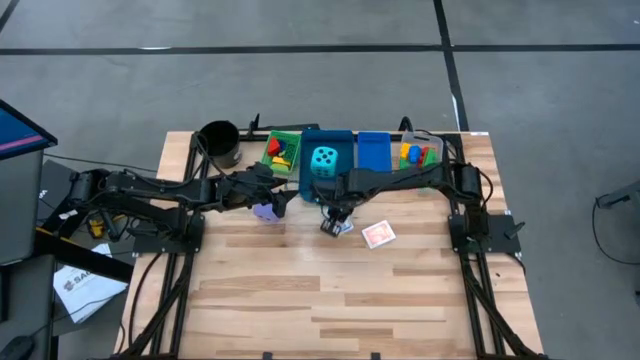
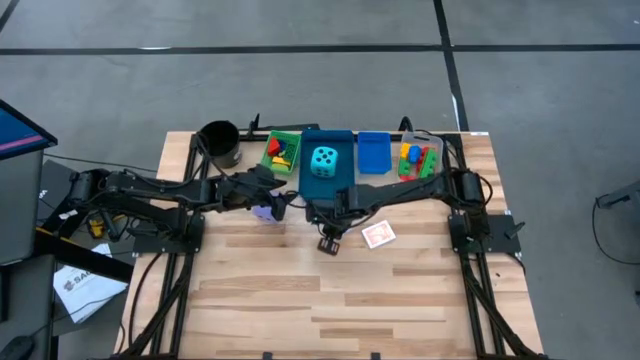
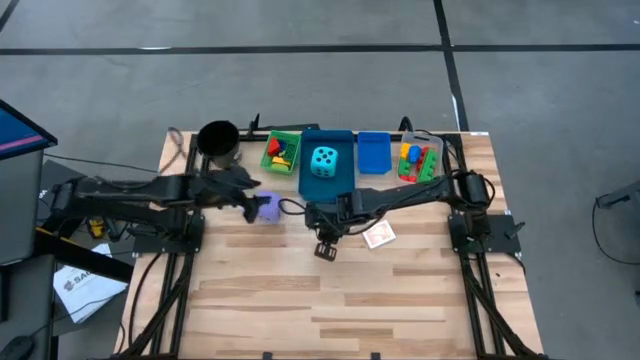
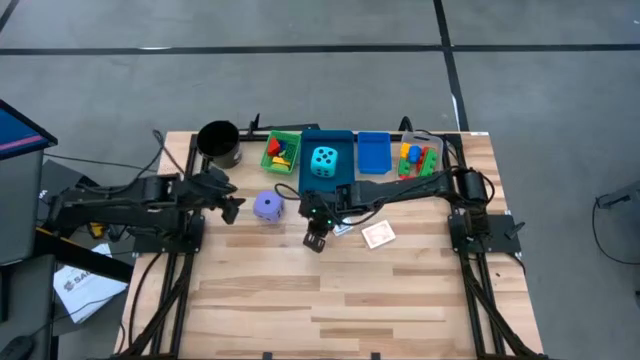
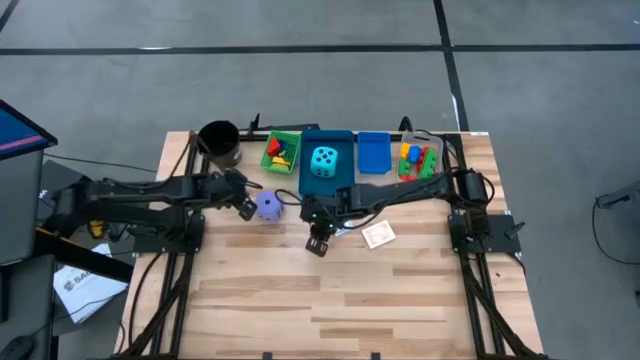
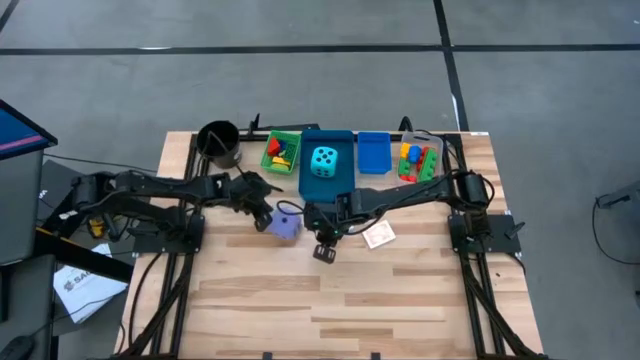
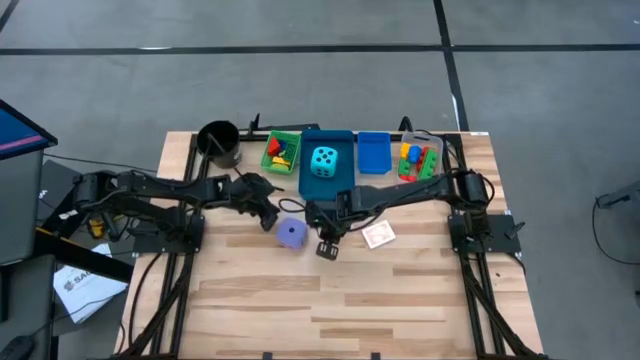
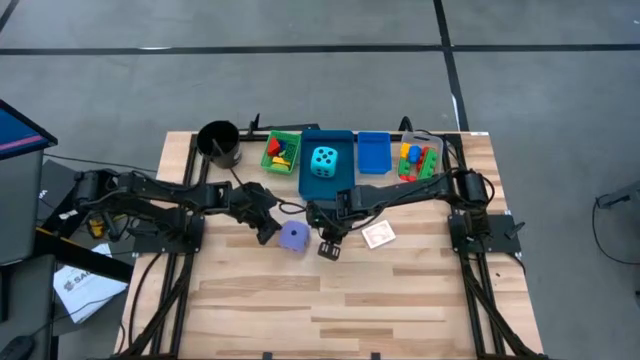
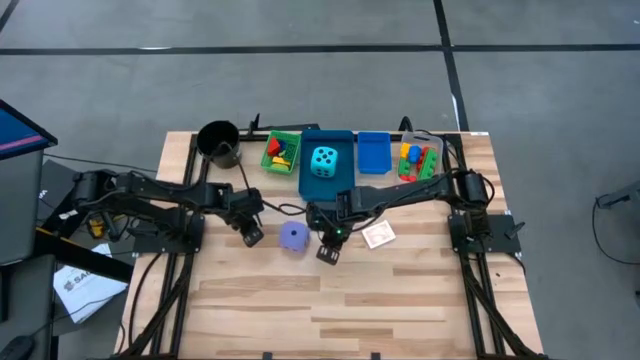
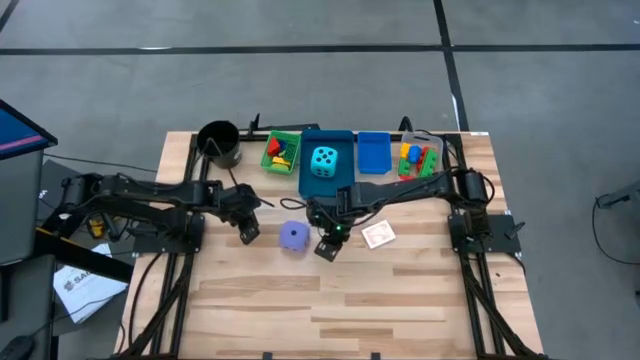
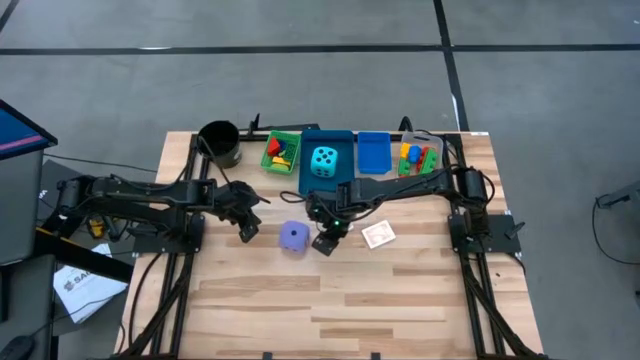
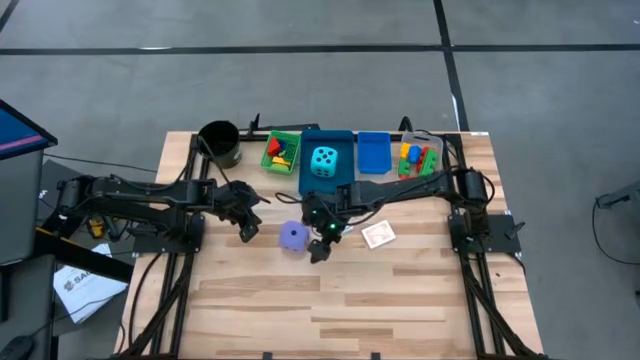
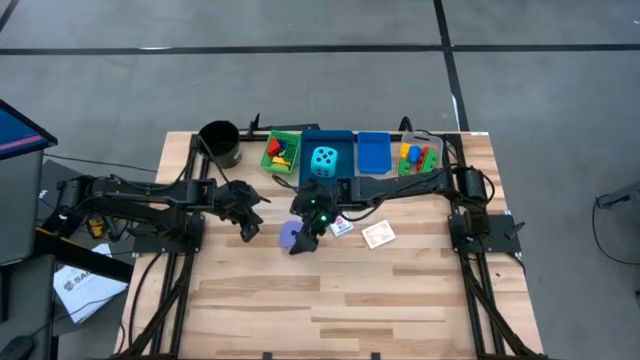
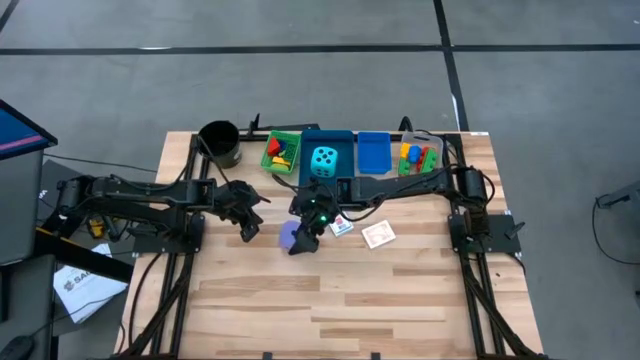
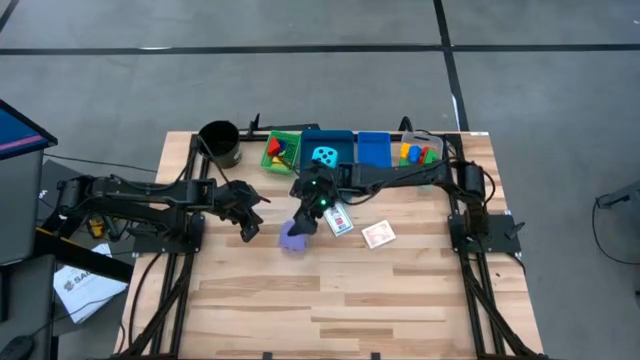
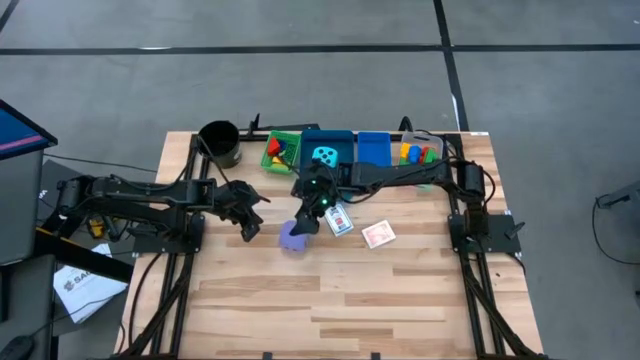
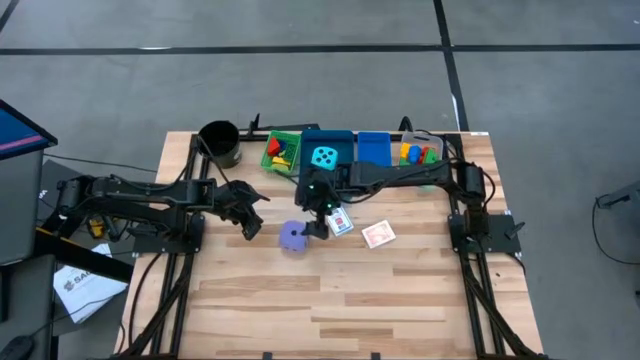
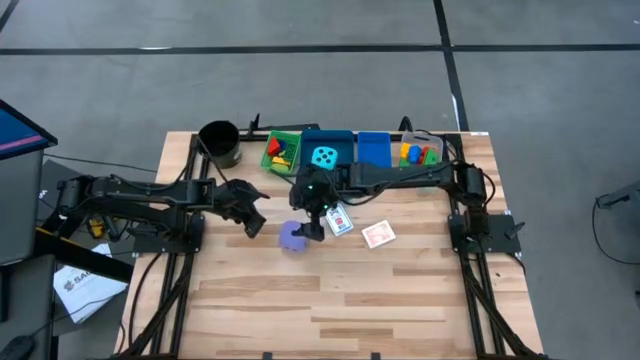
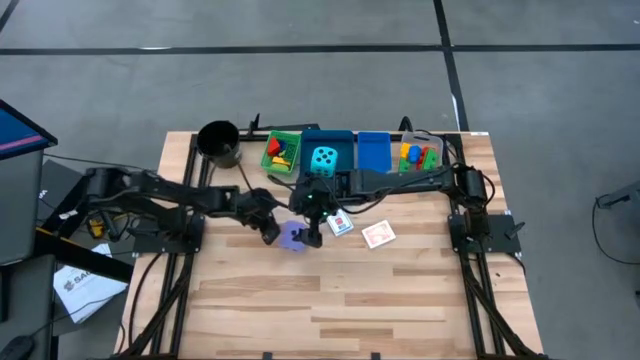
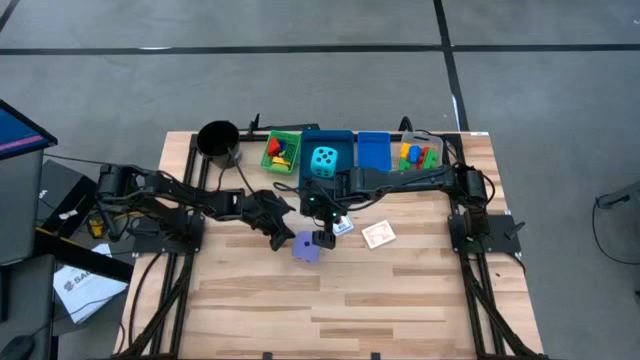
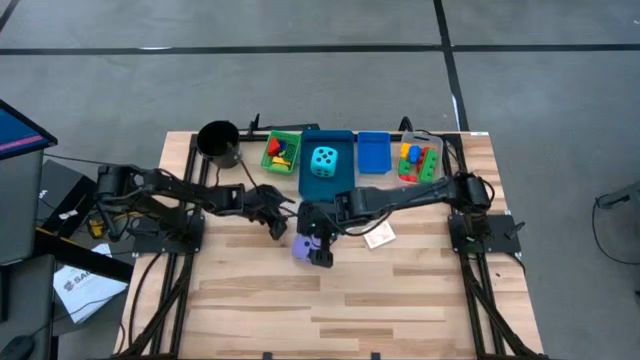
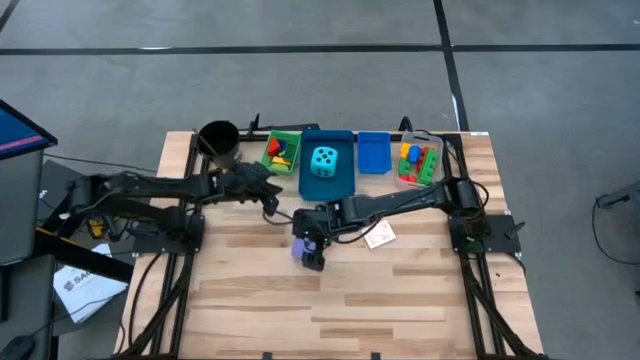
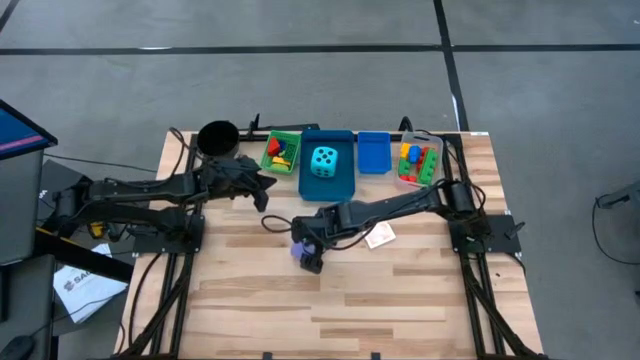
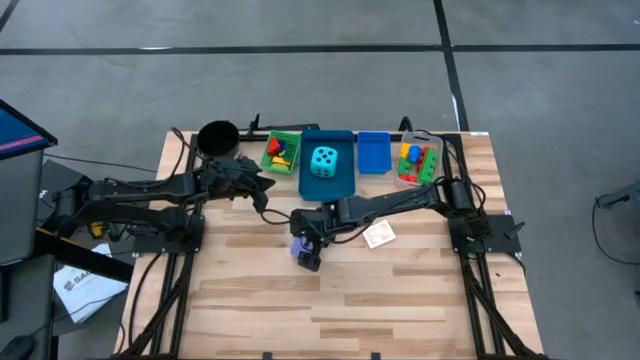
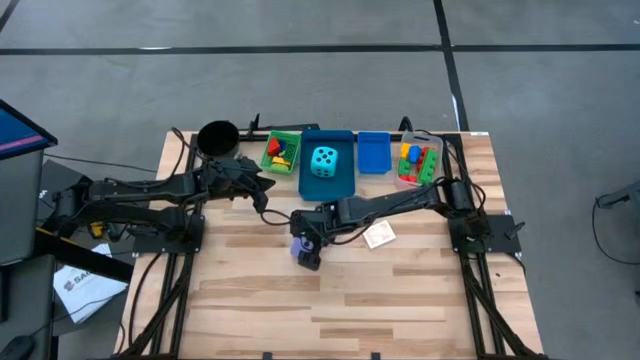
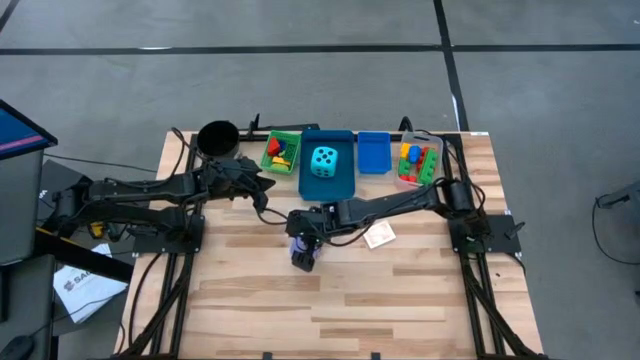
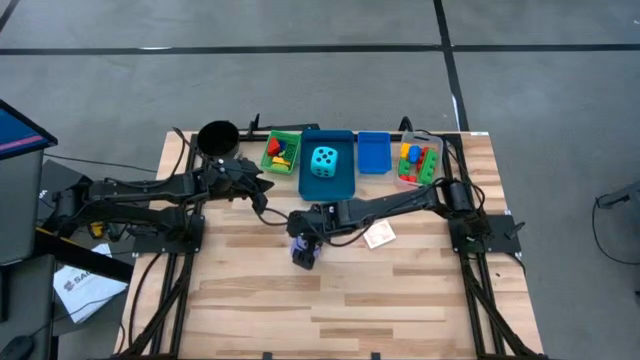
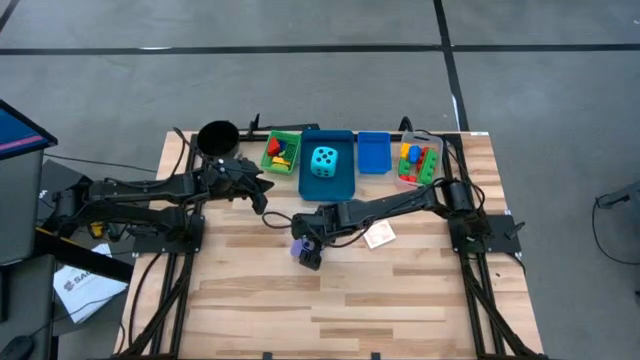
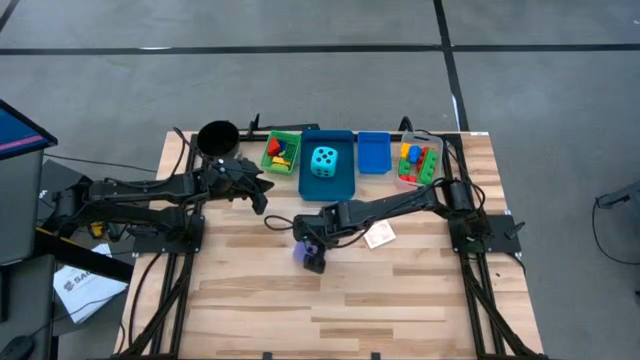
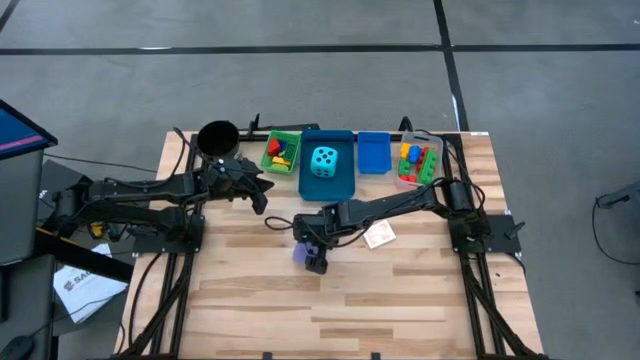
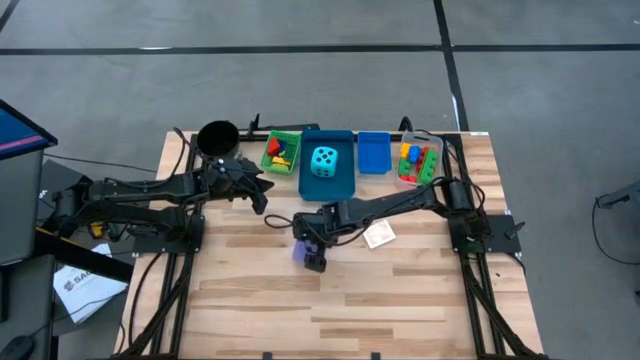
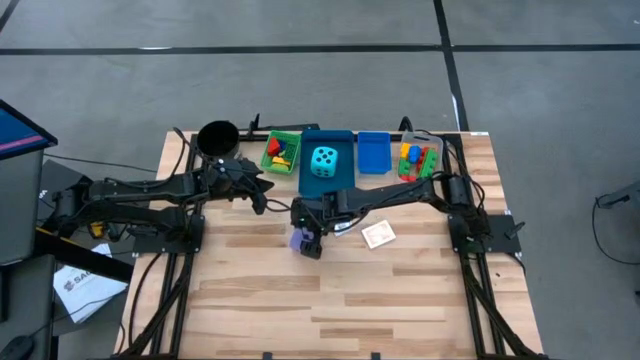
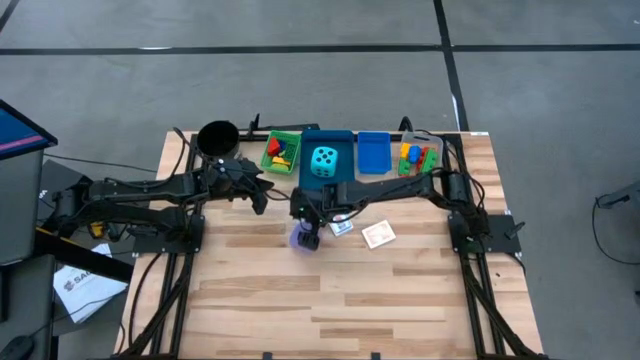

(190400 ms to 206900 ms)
Task: Pick & Place Toys
Put the purple die into the blue bin

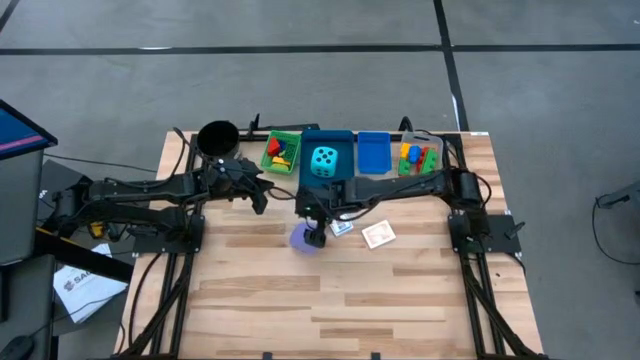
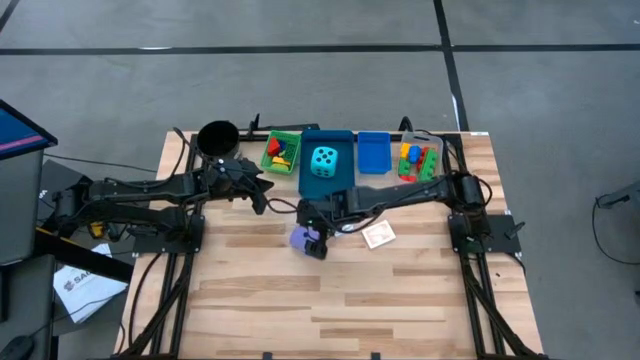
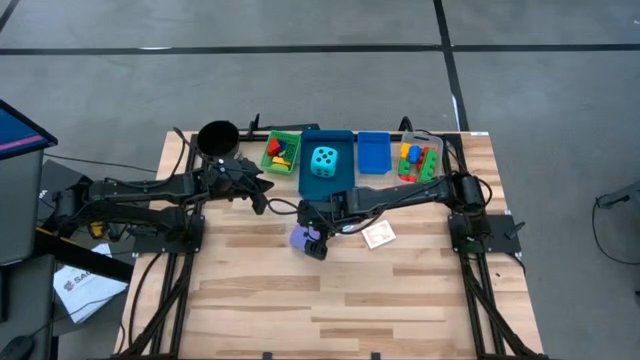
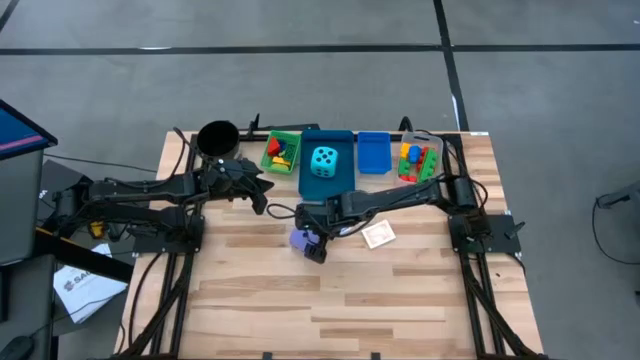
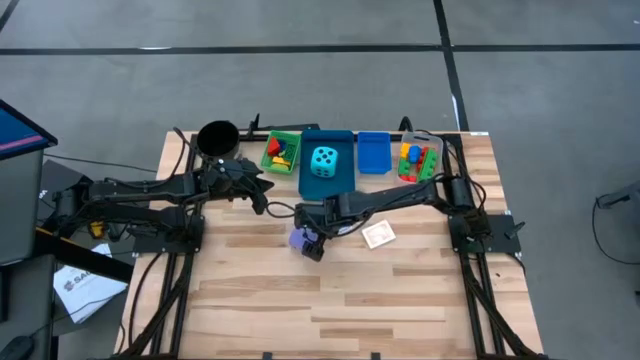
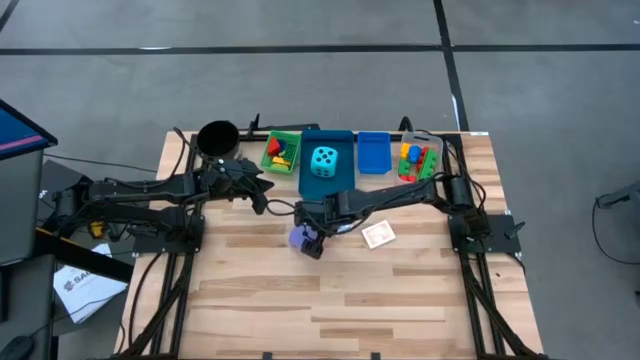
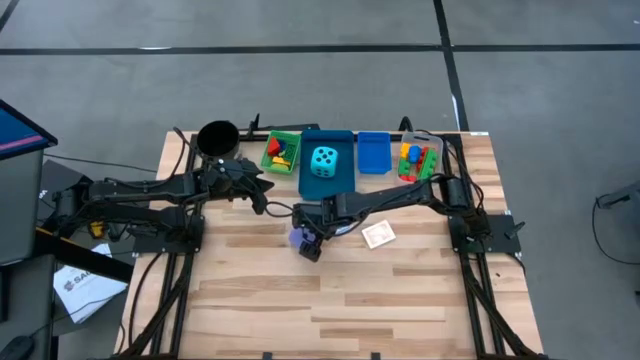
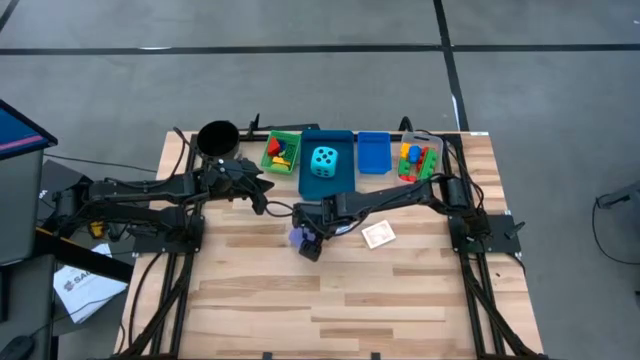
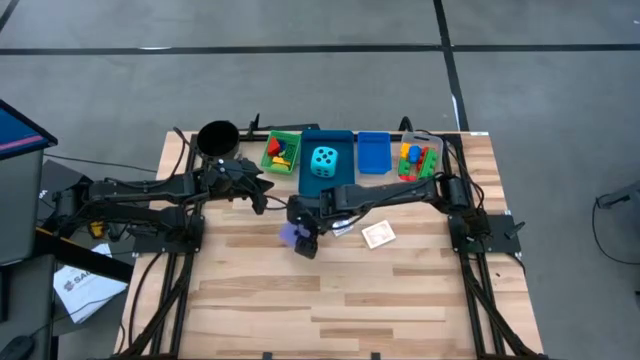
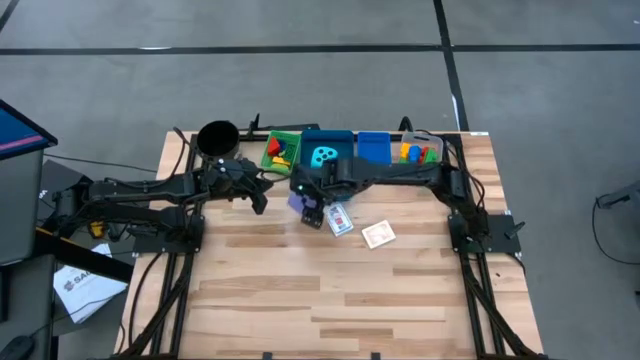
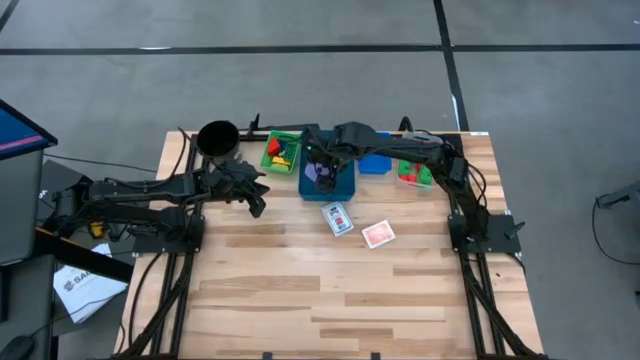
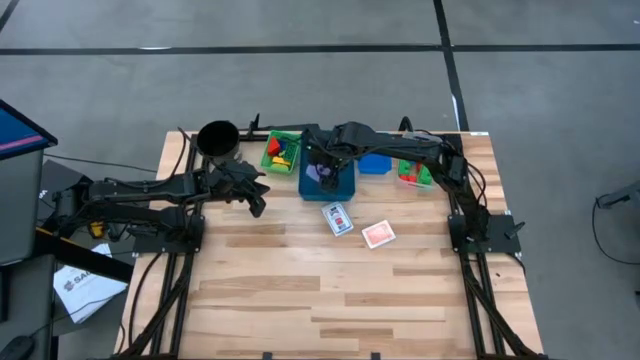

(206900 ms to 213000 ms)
Put the purple die into the blue bin
